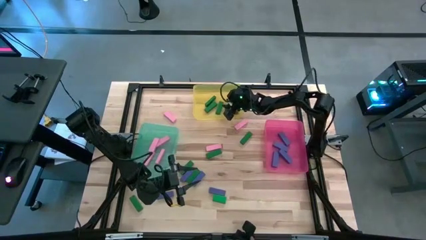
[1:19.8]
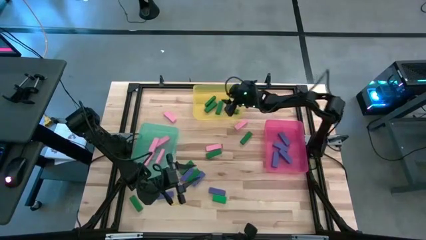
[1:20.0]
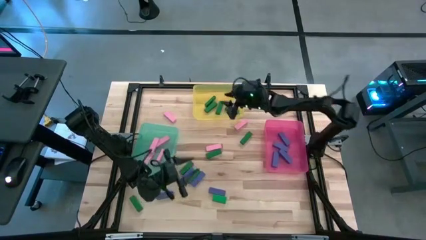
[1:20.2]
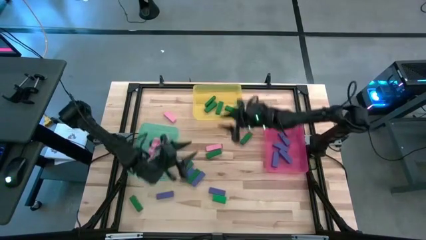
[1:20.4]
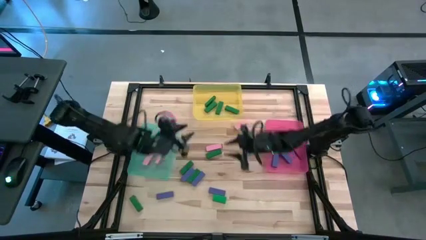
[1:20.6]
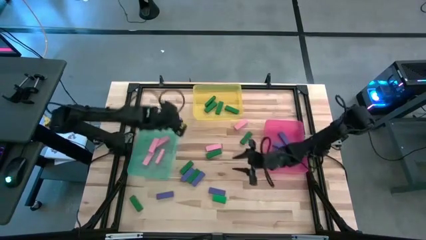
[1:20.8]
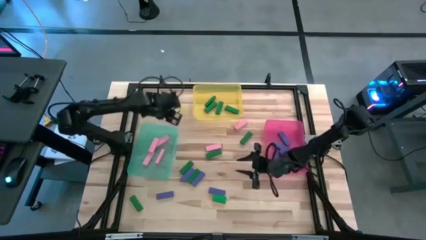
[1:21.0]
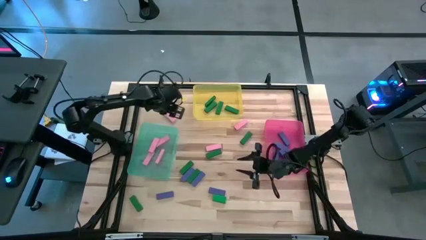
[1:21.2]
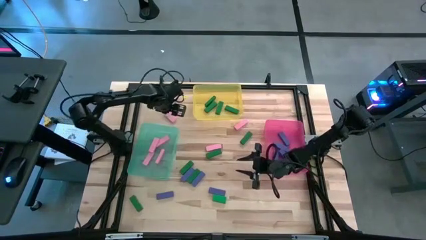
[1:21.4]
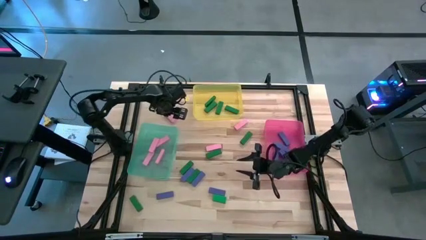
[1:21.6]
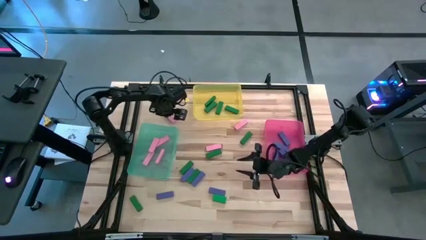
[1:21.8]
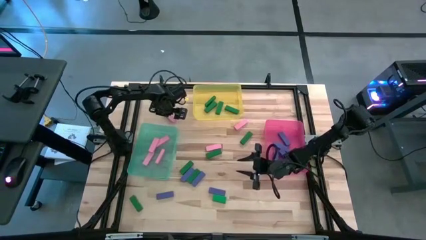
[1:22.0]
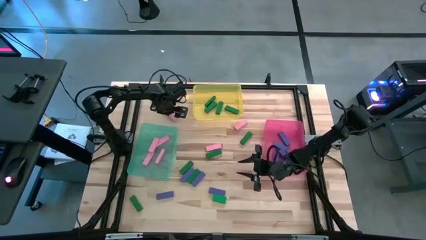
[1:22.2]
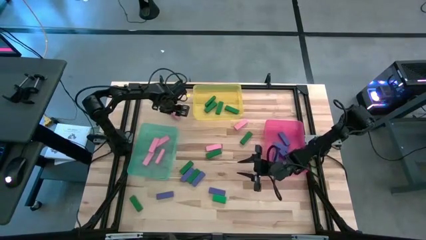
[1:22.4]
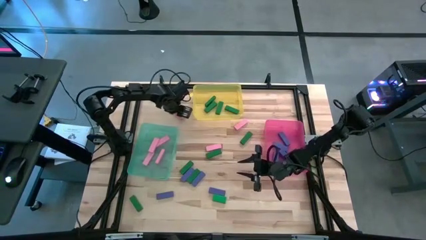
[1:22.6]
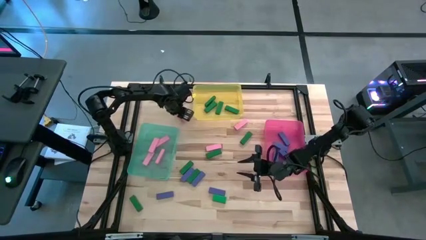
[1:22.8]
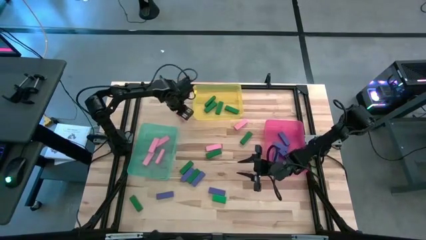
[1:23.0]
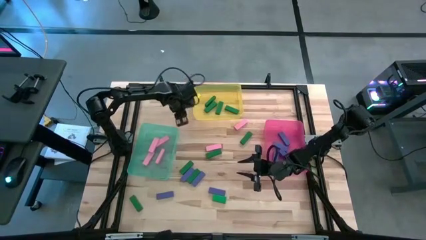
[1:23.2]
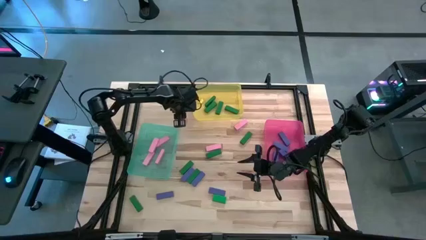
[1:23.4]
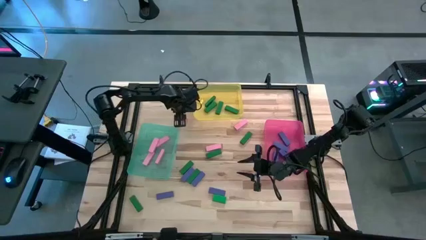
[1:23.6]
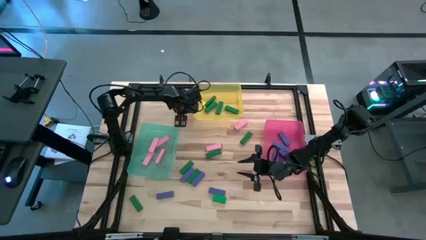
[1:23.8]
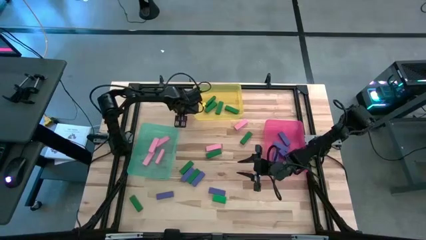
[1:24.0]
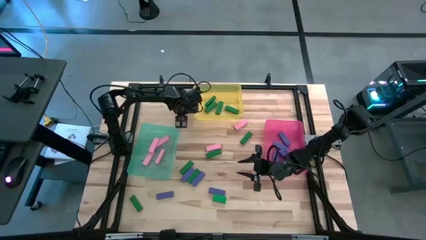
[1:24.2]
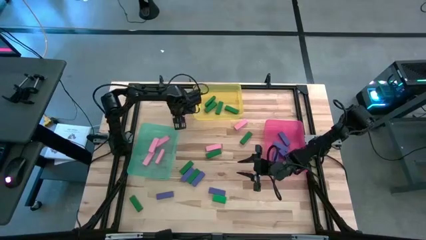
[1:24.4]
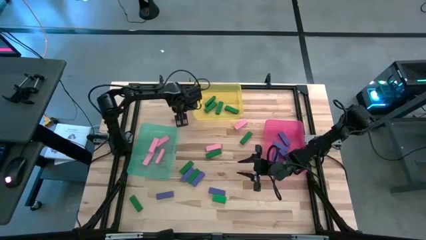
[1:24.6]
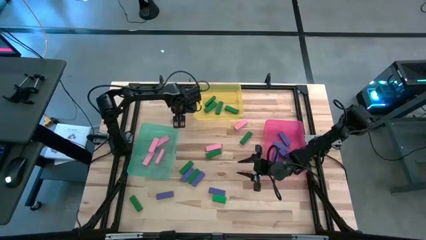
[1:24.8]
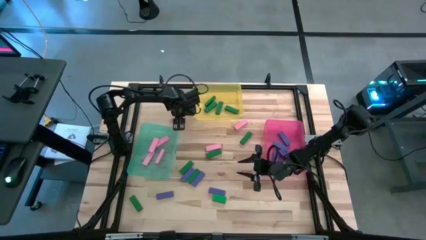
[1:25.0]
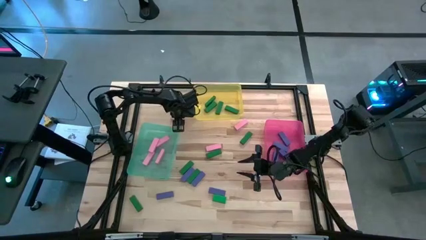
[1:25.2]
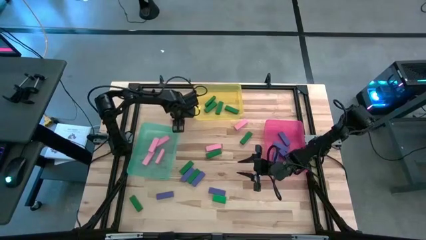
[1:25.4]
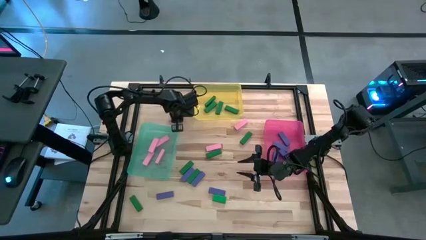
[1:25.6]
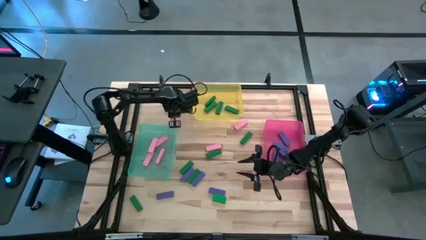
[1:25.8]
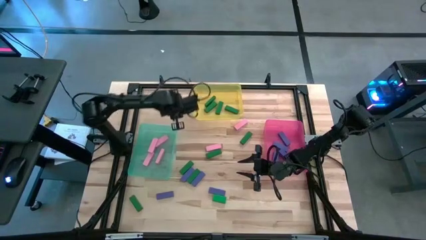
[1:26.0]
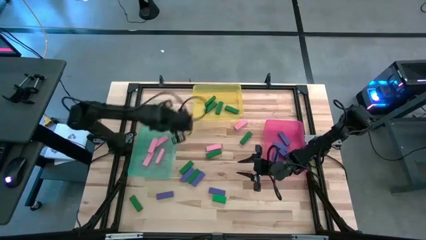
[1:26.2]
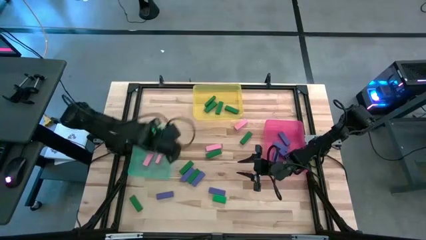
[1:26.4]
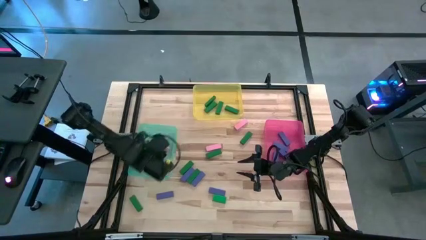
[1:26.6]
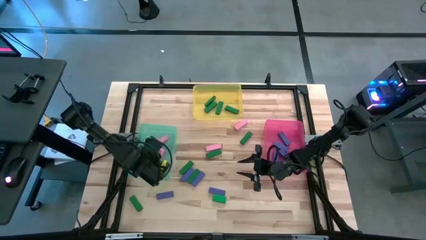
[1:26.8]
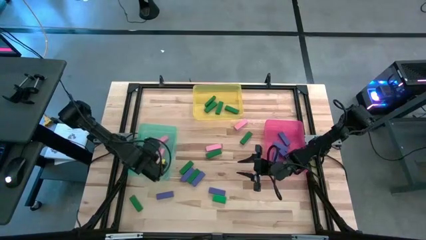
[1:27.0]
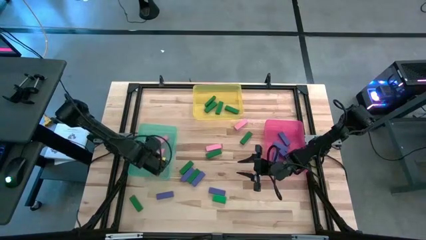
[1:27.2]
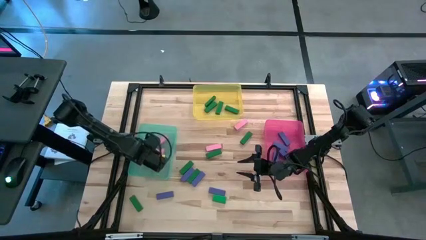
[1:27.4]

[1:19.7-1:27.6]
Task: Sort blocks
Put the pink block into the blue bin

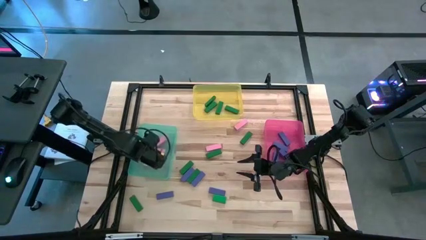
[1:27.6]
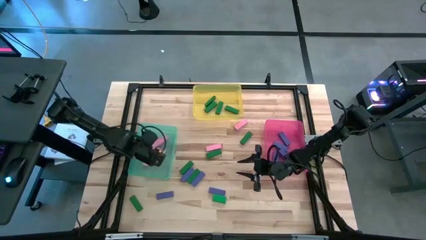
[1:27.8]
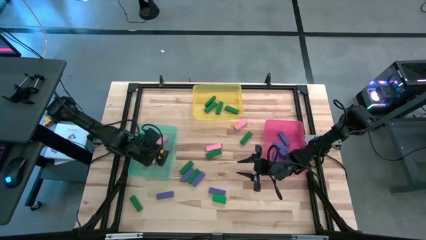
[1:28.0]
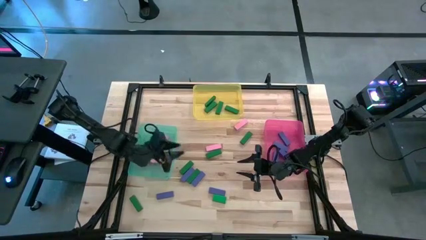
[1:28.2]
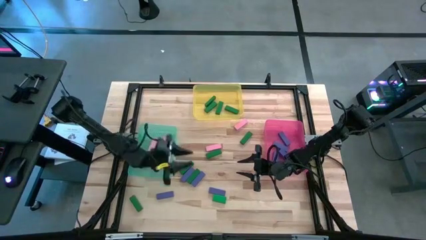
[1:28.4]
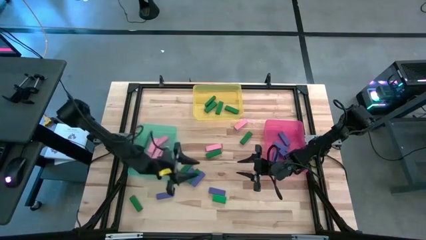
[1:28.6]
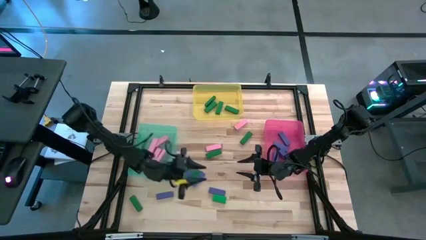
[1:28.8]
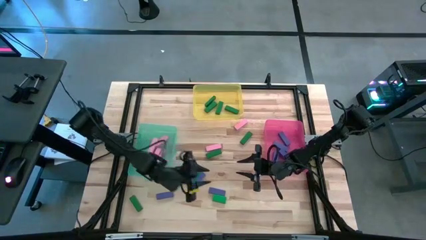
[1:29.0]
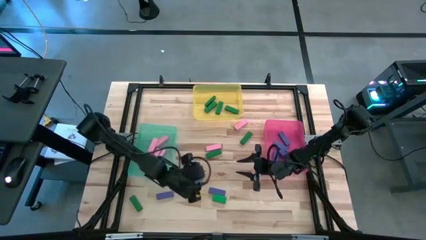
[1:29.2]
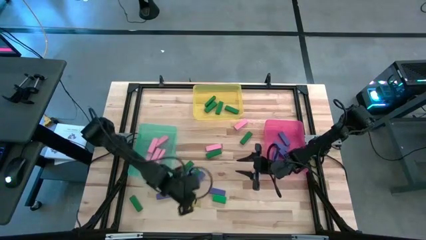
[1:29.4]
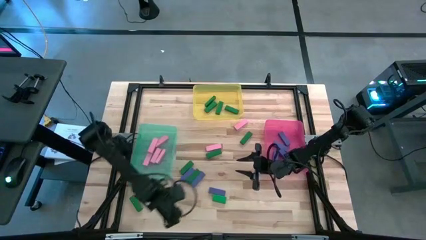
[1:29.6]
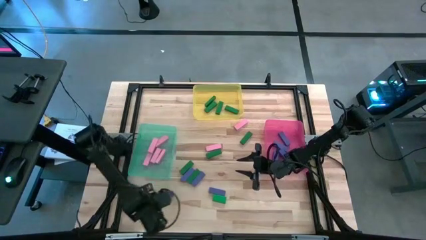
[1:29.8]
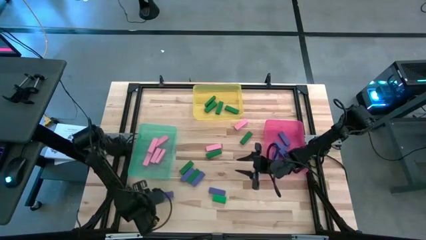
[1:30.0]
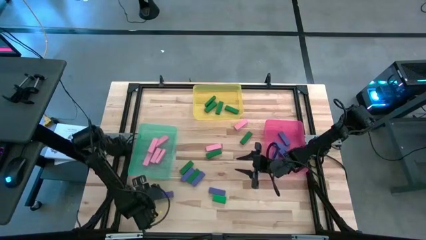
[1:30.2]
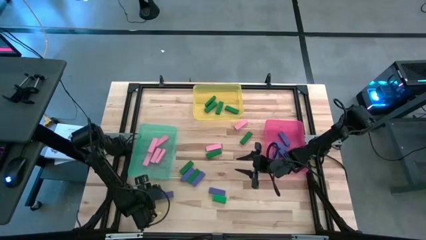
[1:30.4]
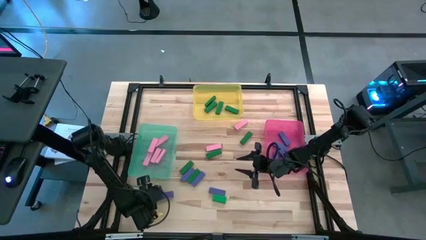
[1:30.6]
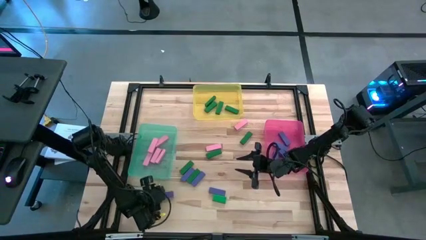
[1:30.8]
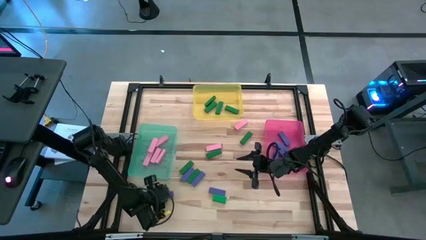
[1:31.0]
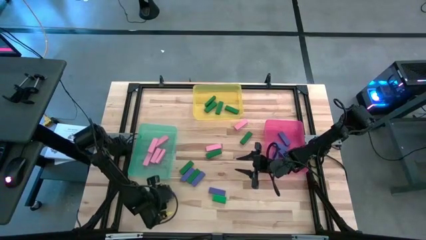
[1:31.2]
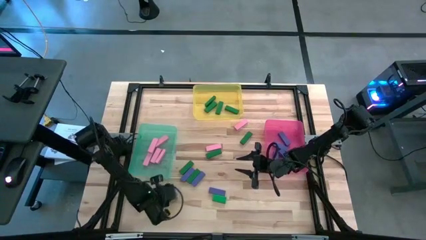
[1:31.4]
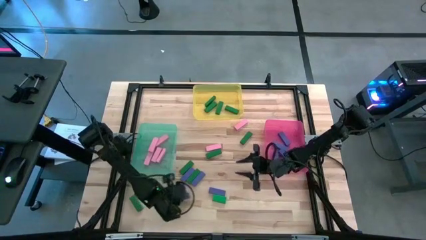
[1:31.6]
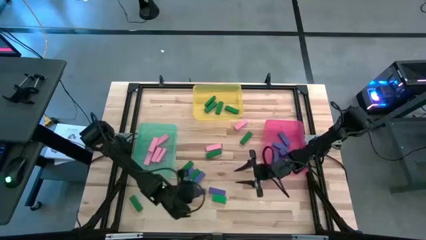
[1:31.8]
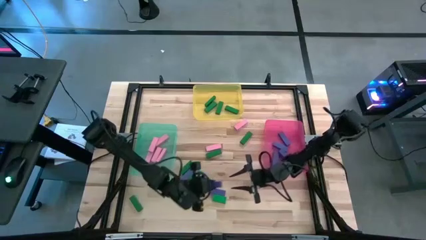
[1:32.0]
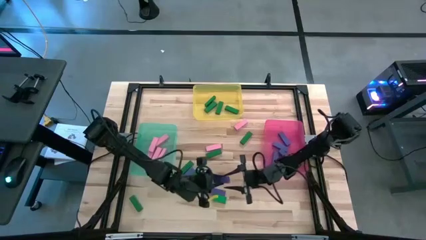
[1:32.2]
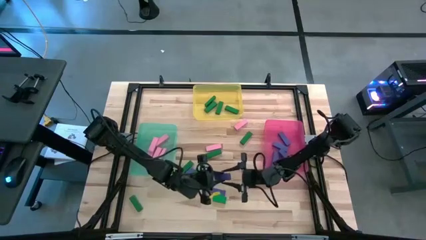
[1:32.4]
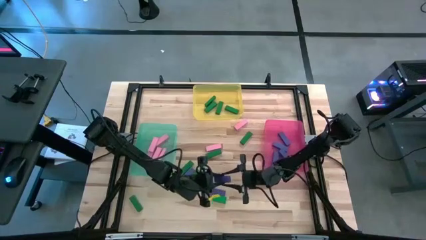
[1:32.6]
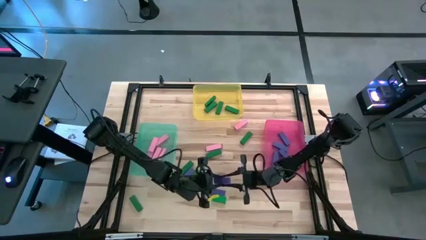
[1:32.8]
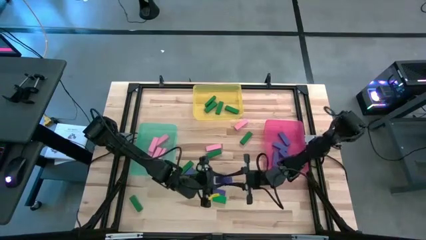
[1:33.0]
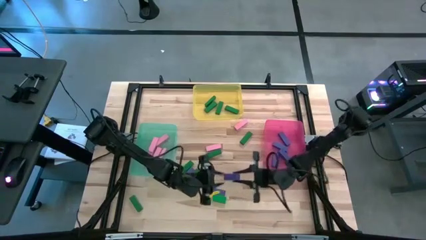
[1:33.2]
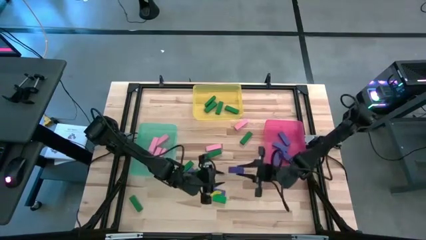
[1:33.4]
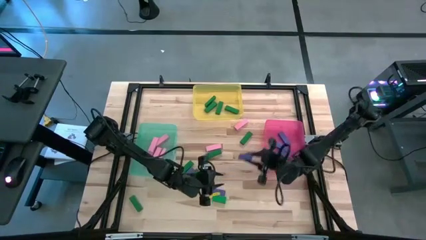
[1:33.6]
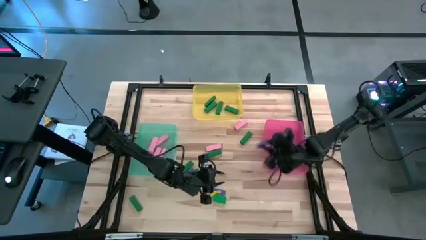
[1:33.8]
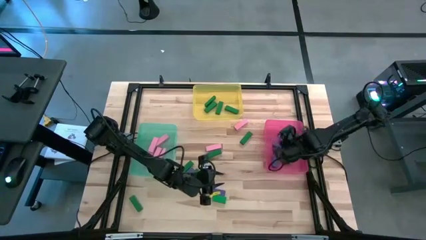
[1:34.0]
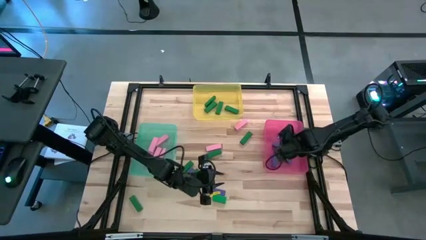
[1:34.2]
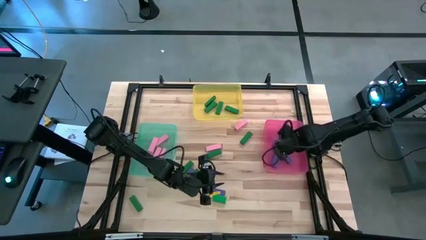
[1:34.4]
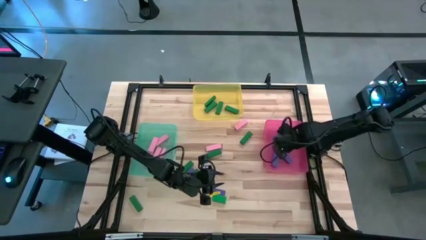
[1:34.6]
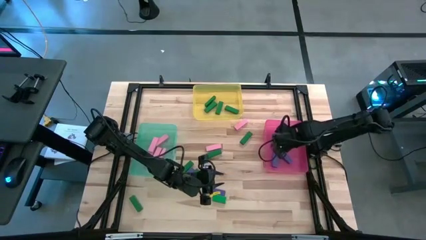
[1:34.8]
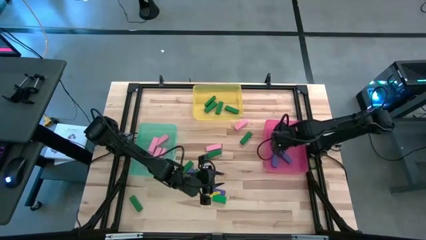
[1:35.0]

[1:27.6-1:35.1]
Put the blue block into the pink bin

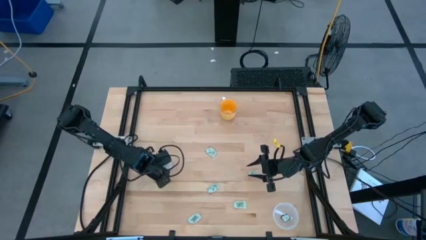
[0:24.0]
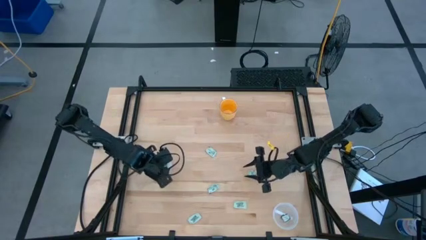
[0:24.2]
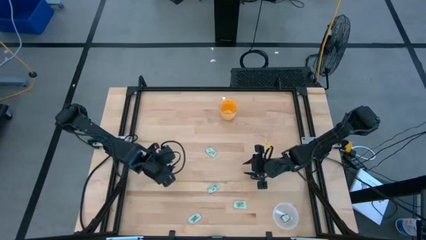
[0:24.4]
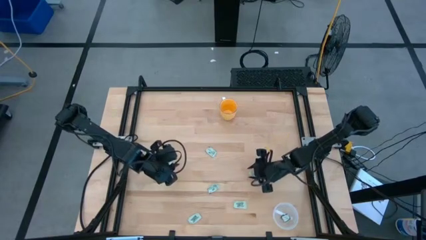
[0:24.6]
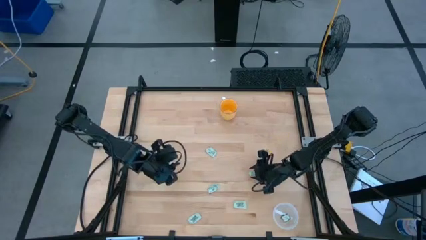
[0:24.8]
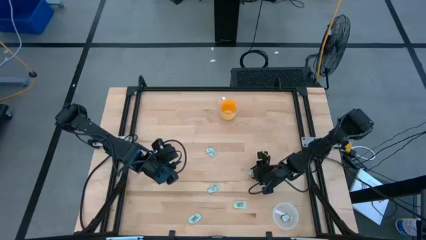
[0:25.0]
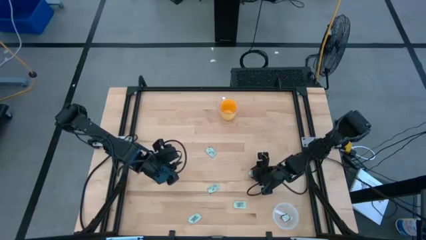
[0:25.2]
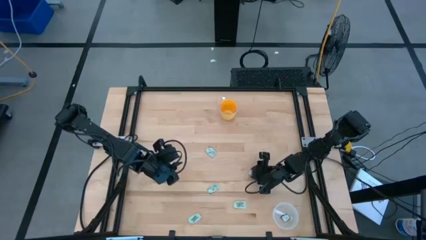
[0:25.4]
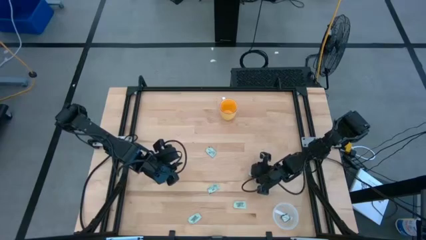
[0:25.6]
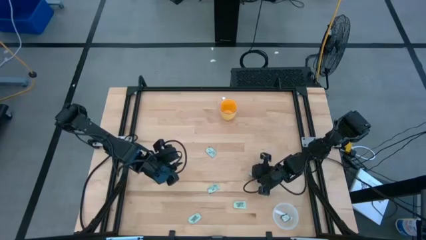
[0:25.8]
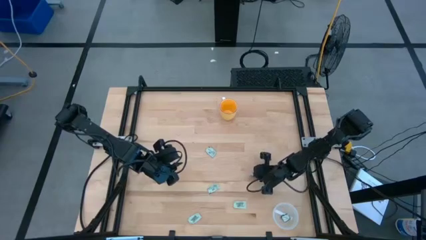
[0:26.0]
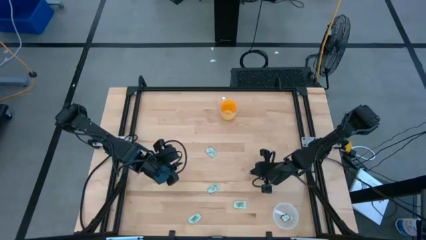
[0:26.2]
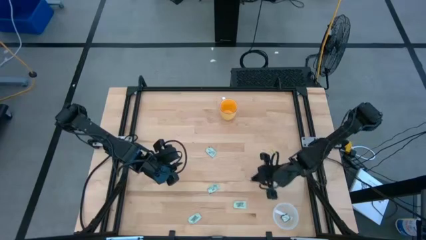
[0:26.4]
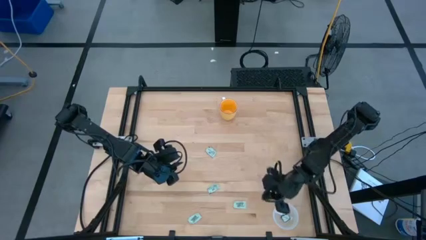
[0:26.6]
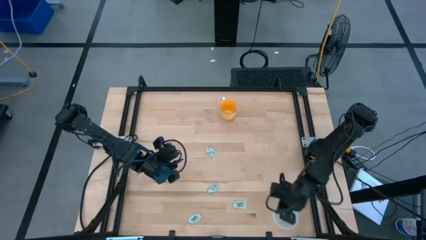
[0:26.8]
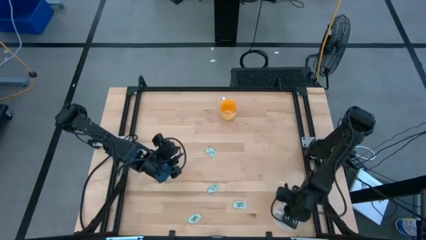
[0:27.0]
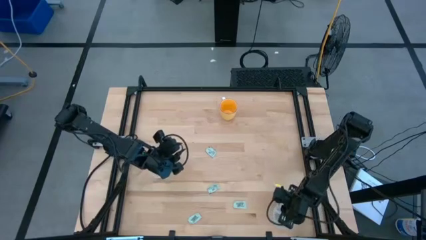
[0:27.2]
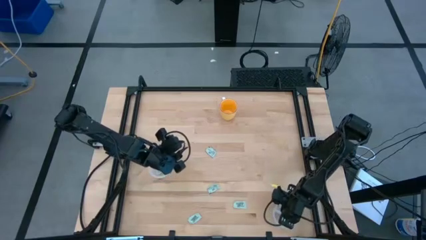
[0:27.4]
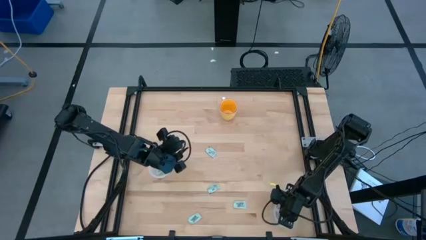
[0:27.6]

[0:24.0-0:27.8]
Task: Pick and place Stevia / Truvia into bins
Put the light green stevia packet into the right transparent container
